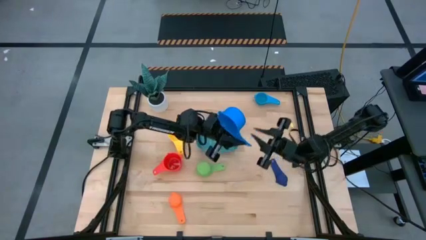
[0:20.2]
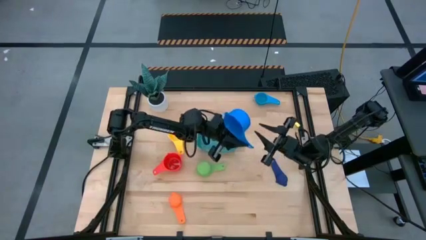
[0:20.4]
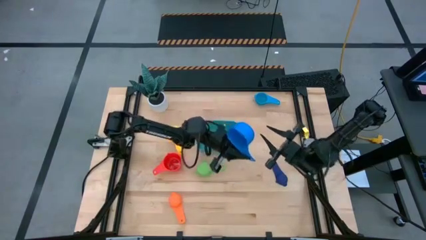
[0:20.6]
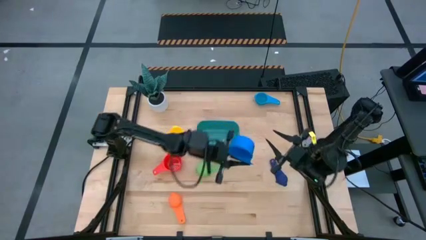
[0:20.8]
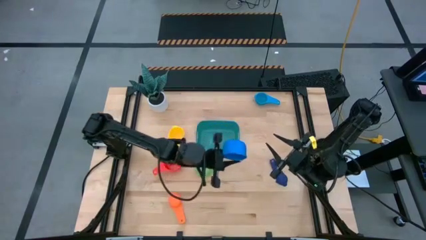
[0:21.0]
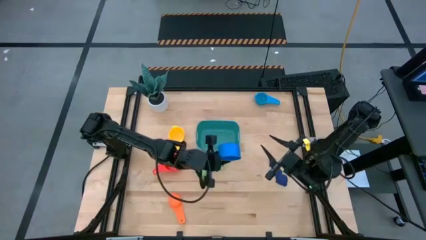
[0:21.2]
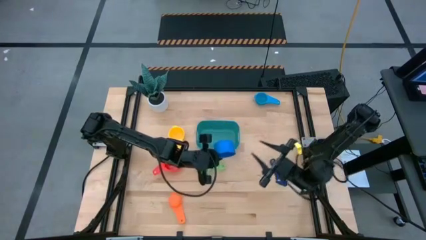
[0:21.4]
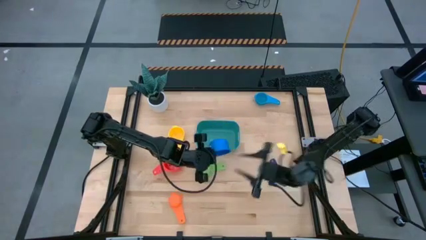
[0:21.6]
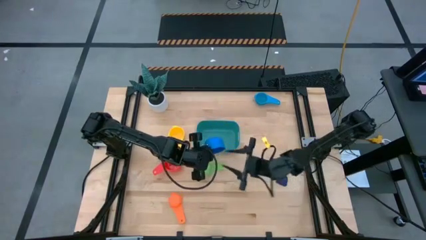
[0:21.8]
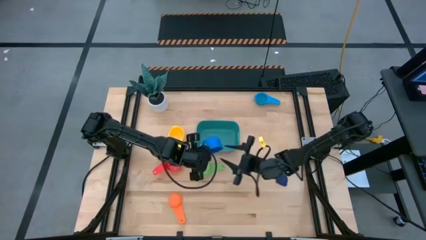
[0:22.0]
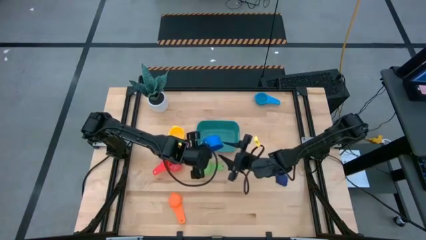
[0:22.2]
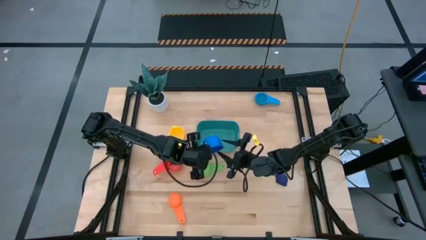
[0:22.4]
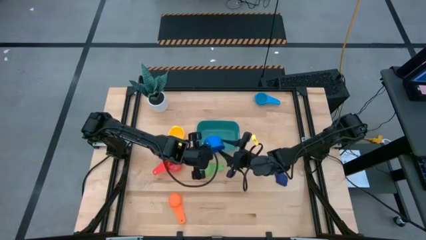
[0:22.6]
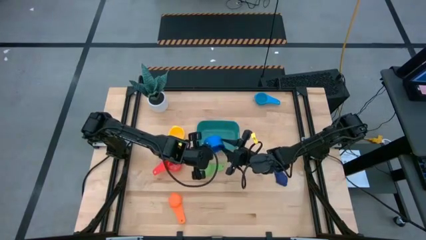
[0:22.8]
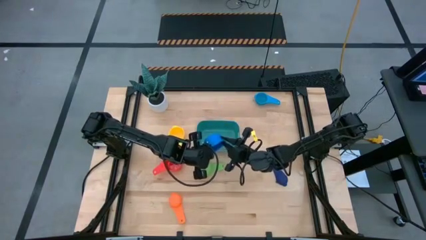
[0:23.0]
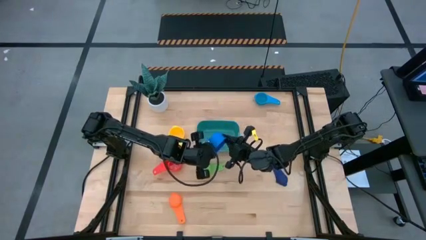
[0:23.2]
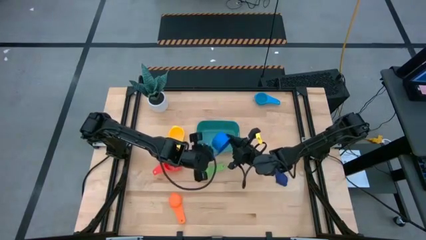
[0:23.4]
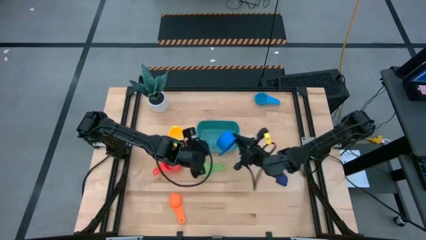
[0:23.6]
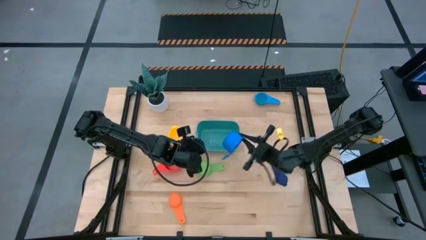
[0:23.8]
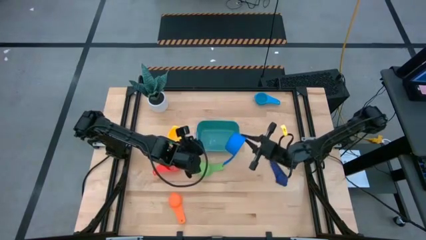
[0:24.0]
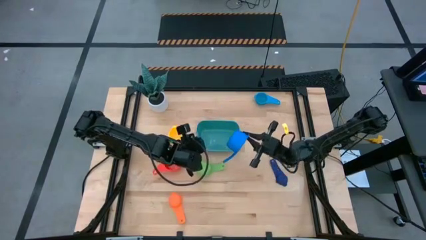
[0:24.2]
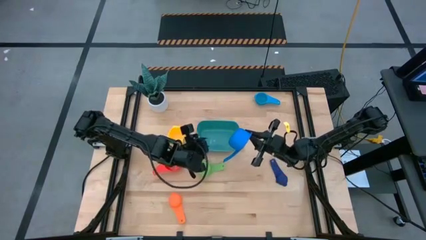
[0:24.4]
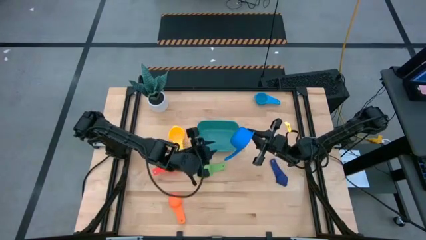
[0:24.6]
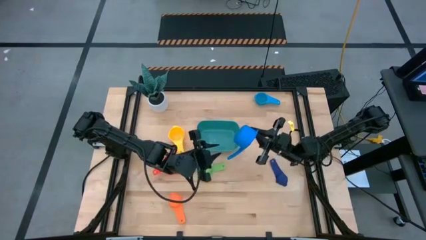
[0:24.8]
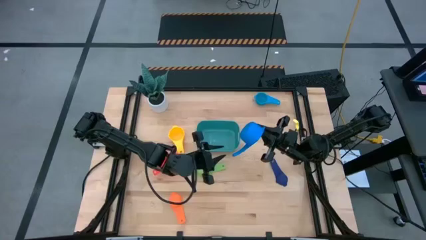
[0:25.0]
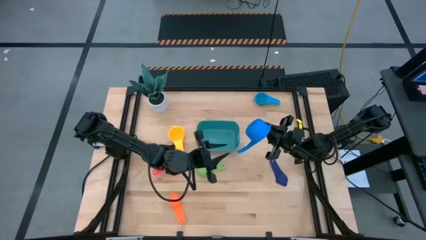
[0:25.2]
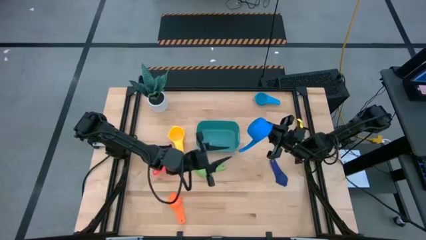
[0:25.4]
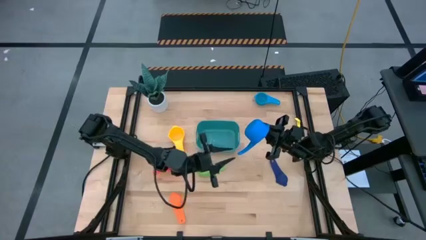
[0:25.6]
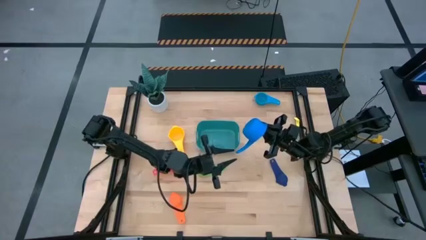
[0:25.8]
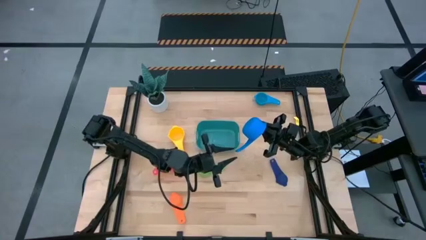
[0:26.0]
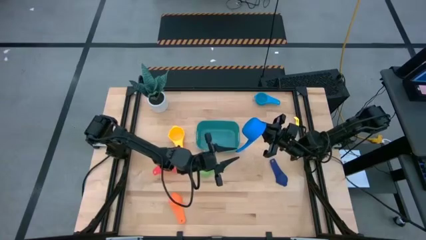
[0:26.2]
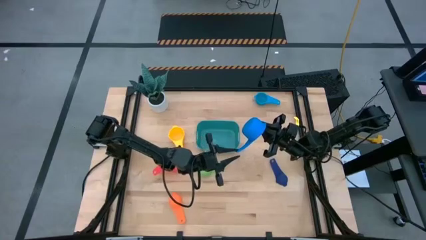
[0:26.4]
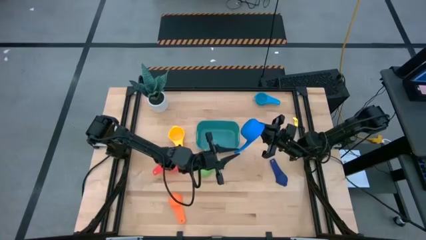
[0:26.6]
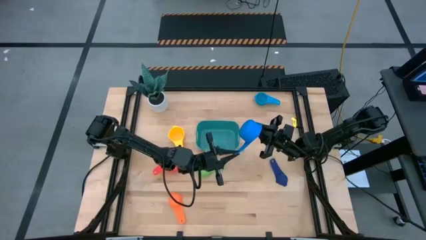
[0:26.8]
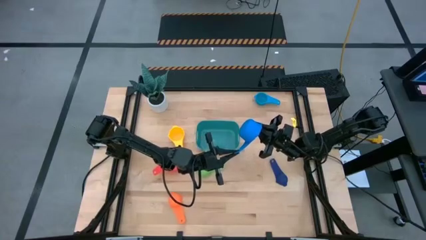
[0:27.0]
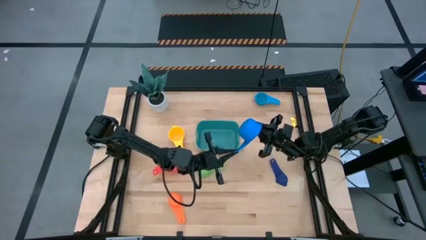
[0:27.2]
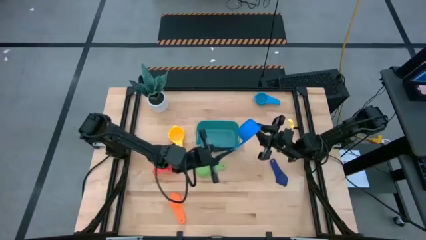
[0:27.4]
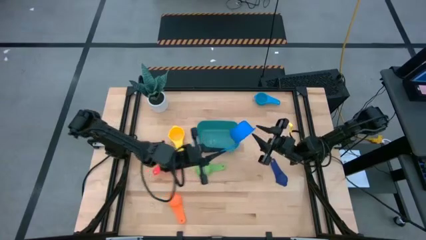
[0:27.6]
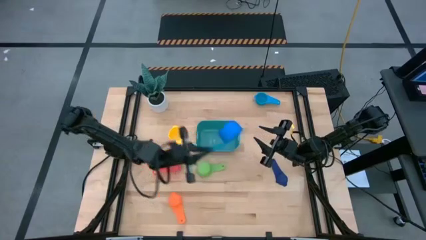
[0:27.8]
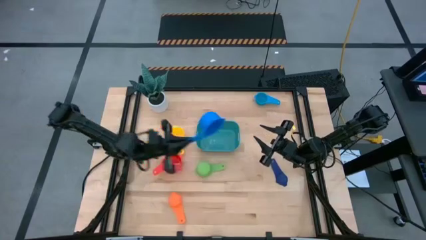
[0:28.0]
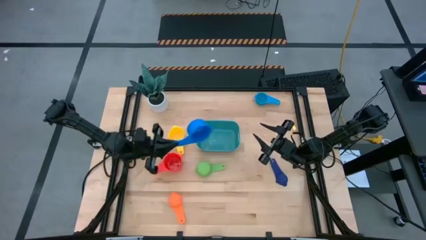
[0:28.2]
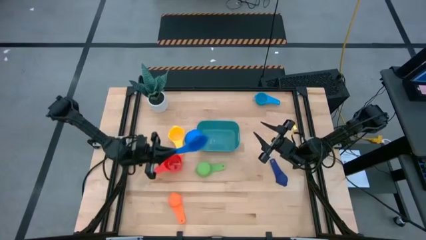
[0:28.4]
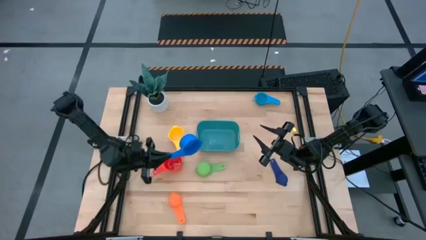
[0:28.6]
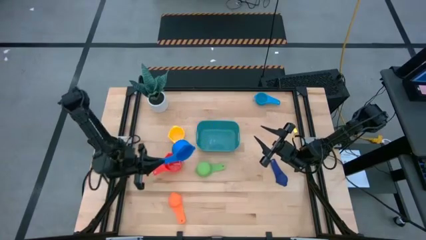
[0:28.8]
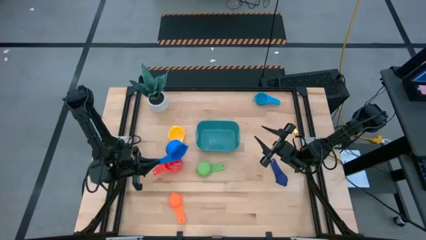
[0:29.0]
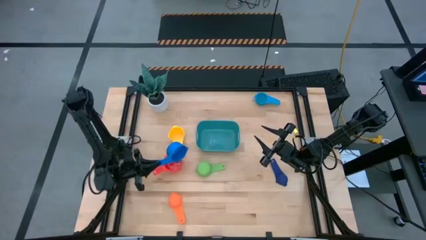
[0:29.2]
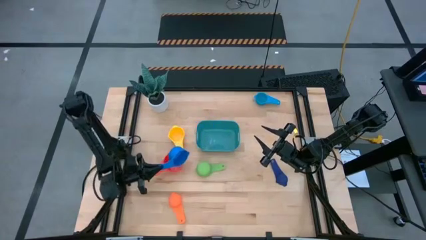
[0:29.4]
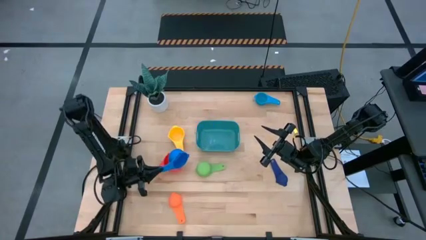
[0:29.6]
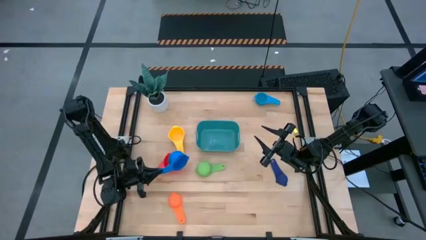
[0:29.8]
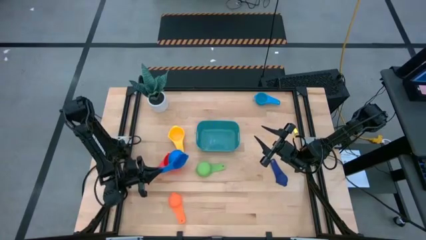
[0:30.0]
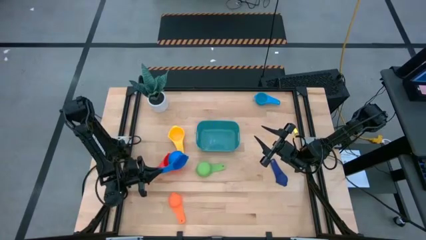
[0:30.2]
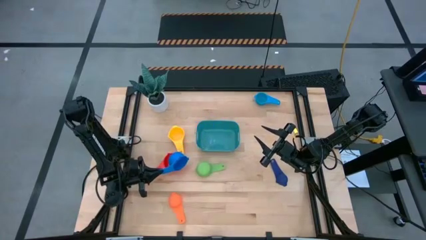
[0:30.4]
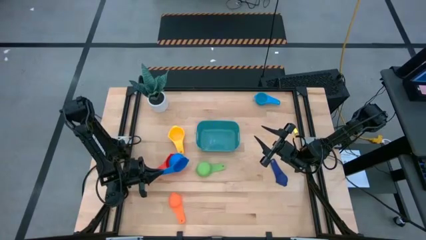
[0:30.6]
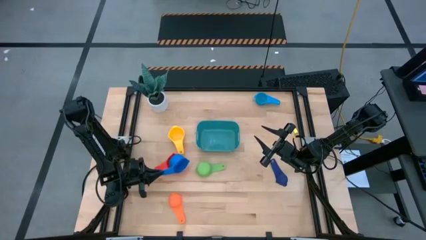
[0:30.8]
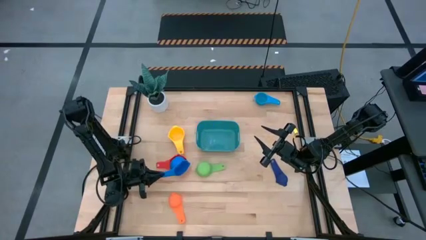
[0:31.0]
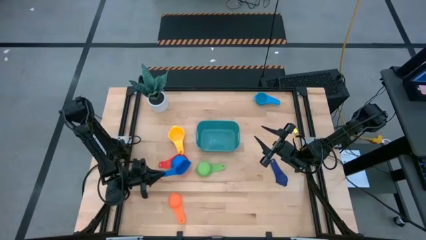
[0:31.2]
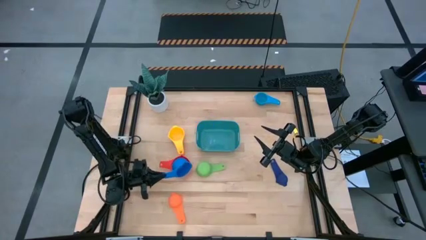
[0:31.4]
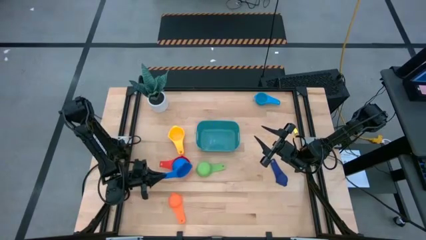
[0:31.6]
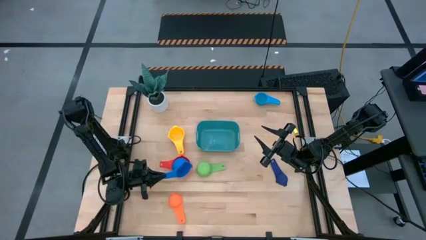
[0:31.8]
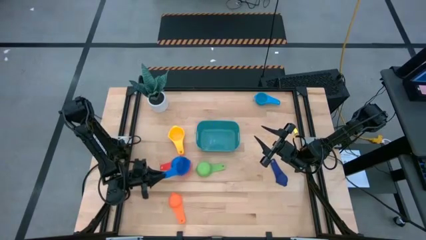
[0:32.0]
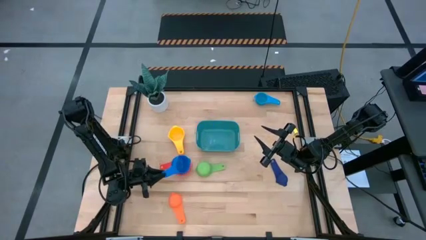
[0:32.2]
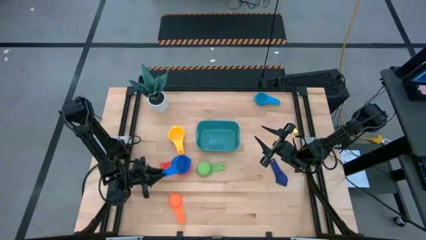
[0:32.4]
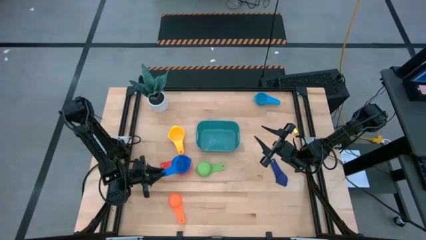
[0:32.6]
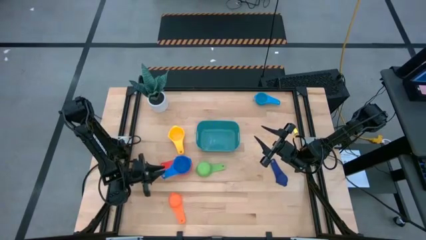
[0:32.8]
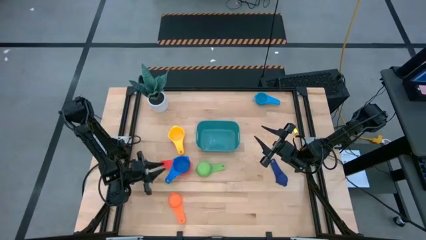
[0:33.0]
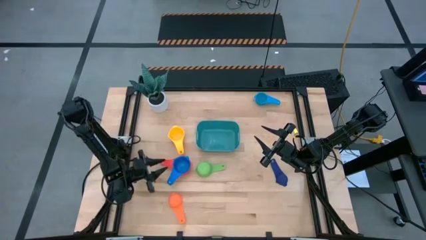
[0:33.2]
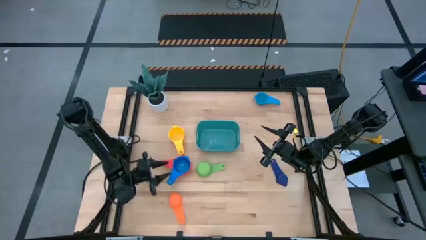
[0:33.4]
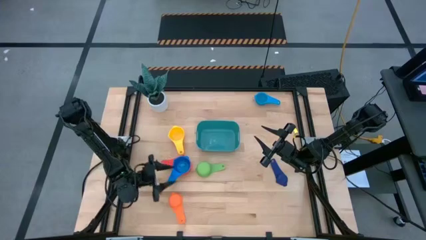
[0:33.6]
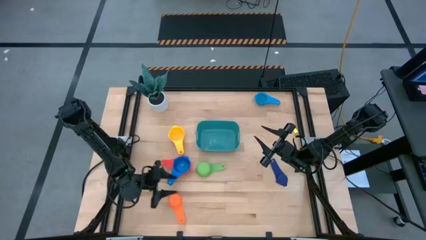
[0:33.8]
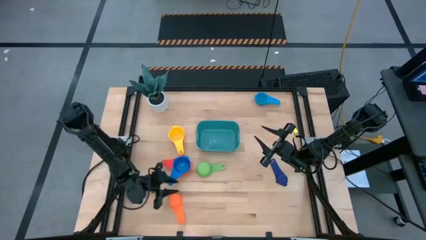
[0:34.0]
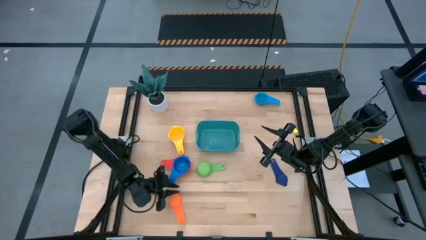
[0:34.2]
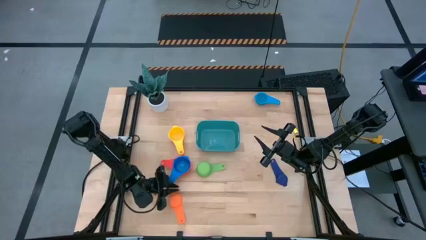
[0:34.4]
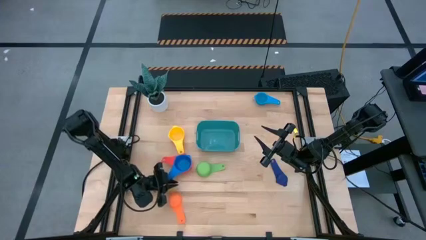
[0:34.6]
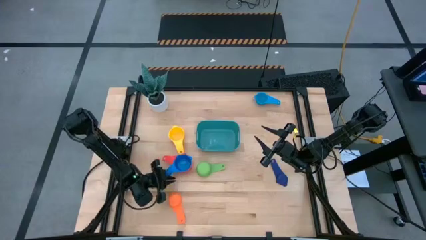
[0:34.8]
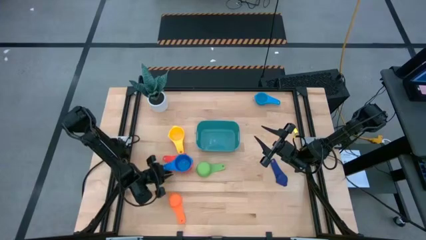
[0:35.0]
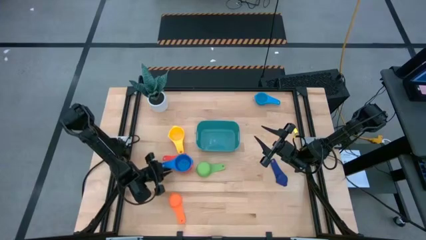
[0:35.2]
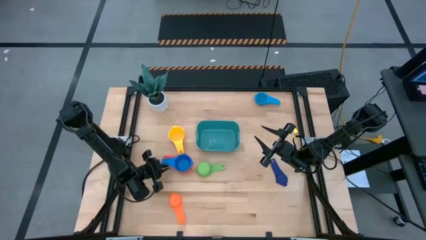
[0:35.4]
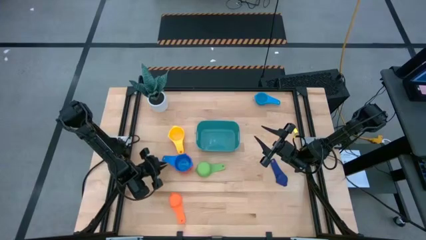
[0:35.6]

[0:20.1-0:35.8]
Task: Nest measuring cups in basket
Stack the blue measuring cup onto the red measuring cup
